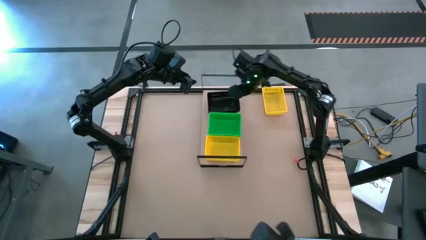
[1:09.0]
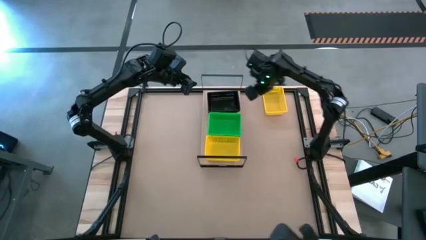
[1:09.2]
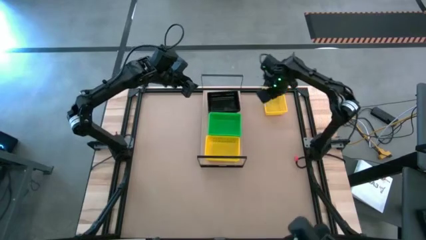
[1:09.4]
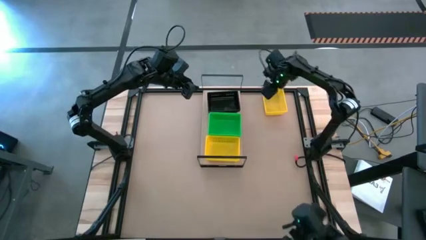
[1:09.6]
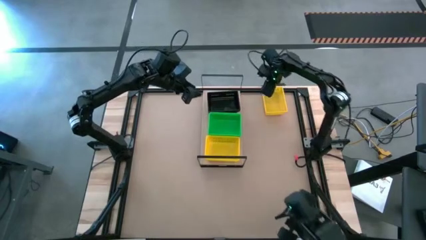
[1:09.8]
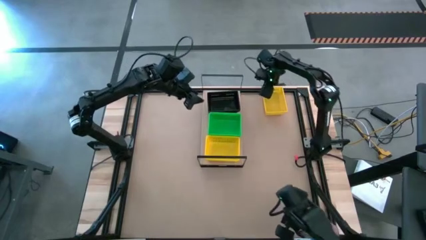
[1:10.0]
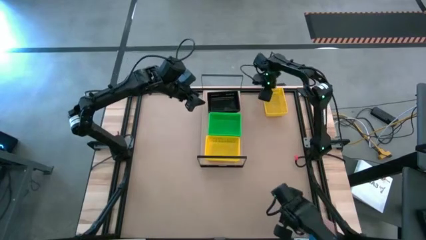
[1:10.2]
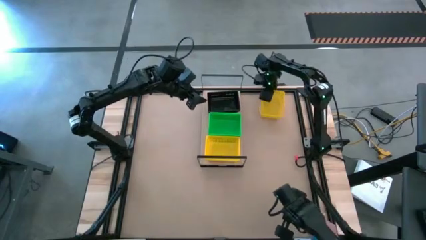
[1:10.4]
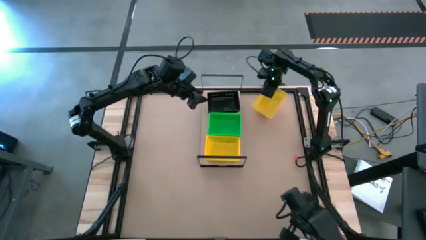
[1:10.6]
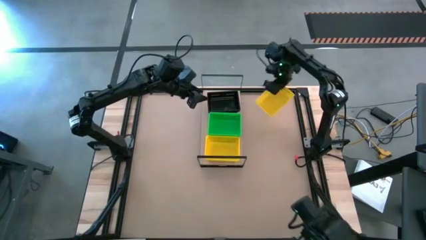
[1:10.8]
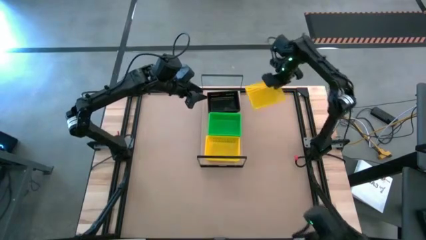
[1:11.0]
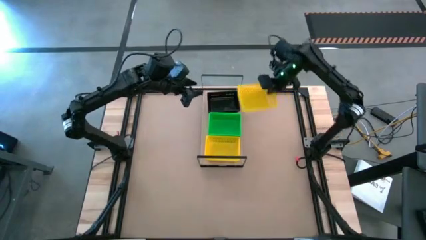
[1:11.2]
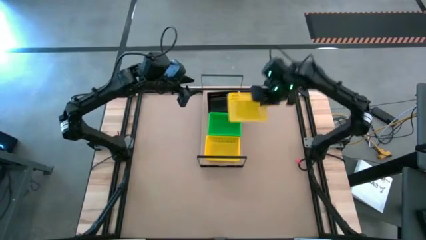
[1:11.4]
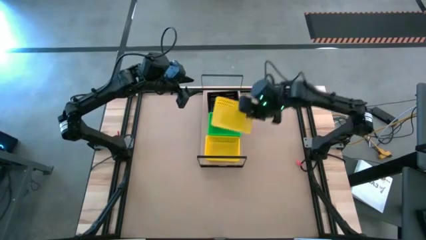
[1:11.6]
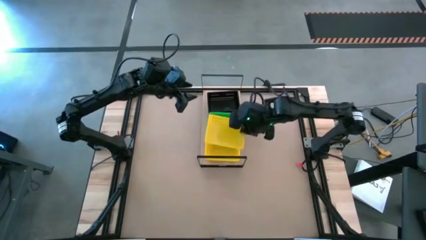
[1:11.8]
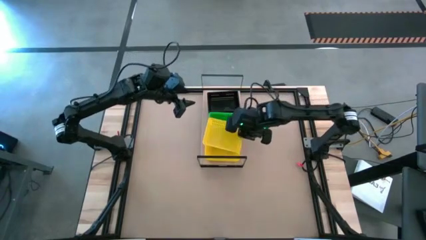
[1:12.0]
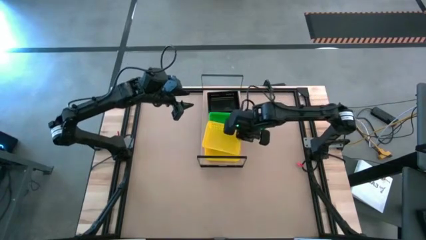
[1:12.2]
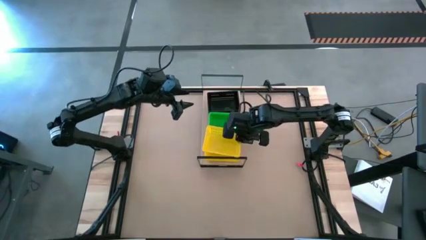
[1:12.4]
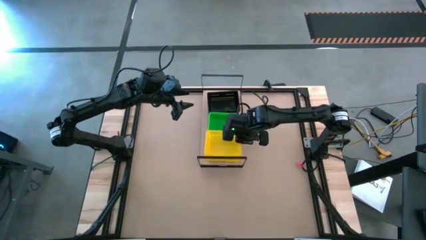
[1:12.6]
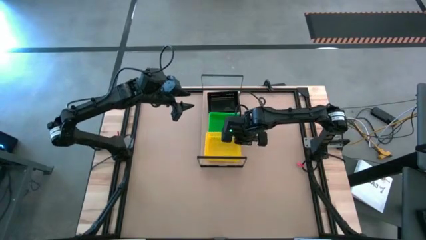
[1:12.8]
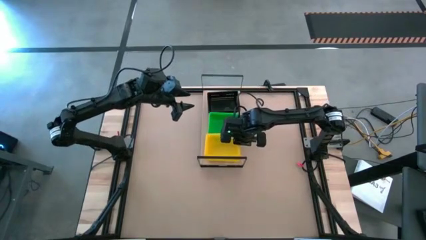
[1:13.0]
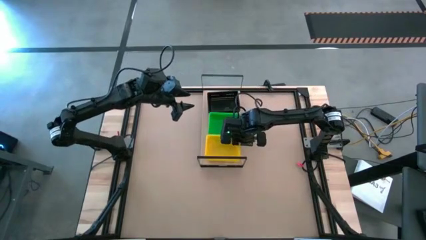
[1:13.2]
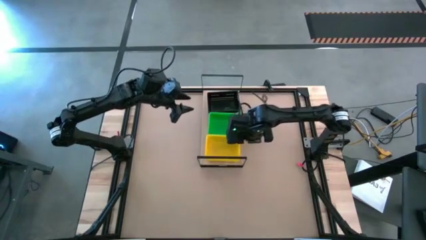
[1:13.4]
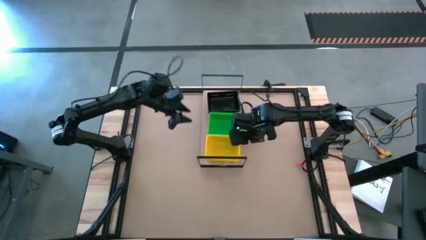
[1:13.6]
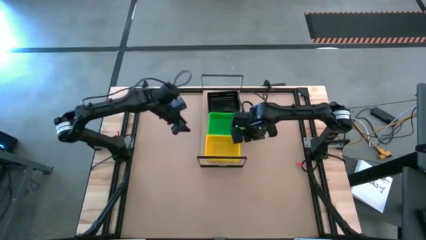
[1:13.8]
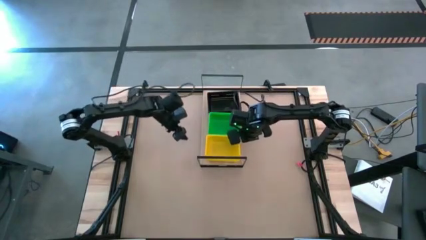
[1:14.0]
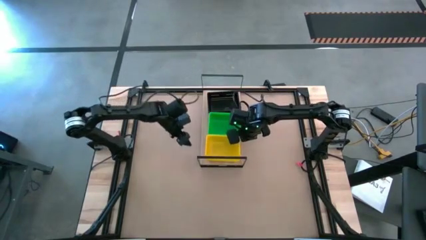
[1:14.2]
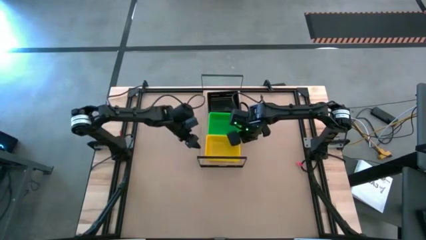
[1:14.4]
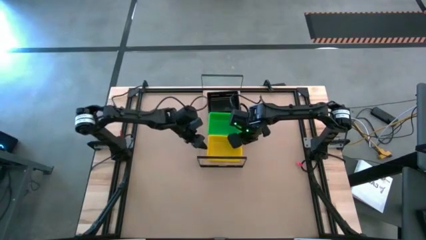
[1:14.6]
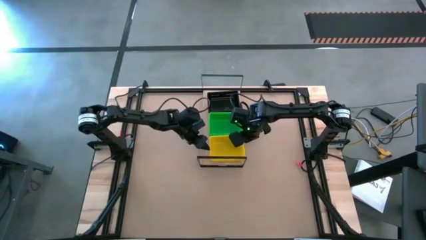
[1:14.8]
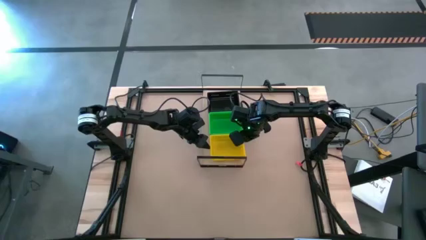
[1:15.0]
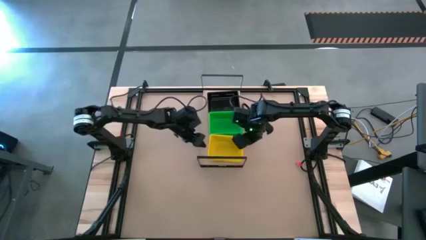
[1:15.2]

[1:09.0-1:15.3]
Task: Stack baskets on shelf by color
Stack the yellow bin on top of the yellow bins on the shelf

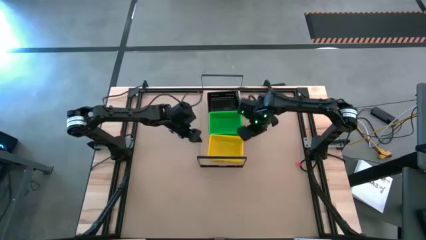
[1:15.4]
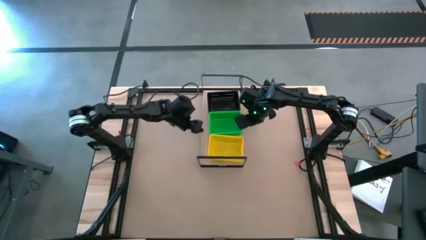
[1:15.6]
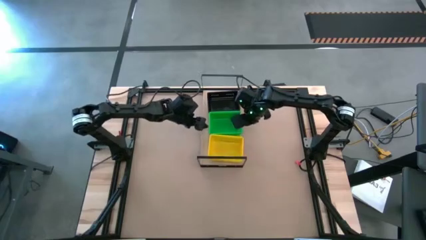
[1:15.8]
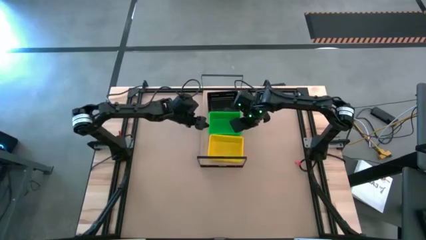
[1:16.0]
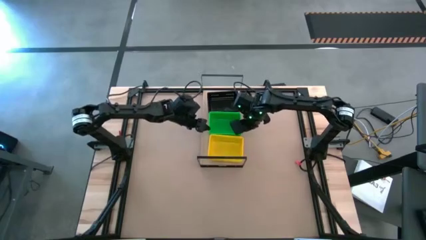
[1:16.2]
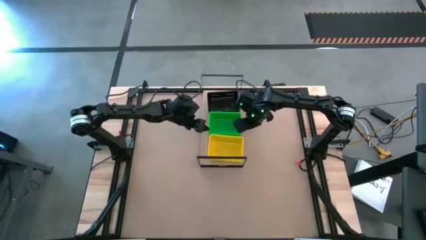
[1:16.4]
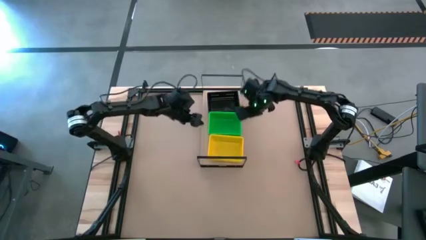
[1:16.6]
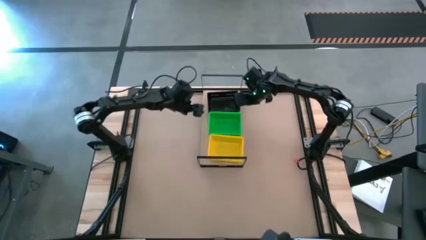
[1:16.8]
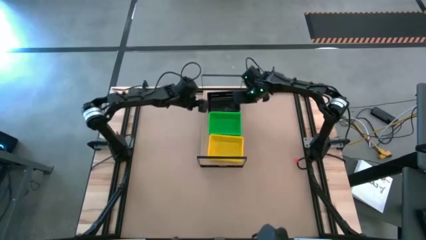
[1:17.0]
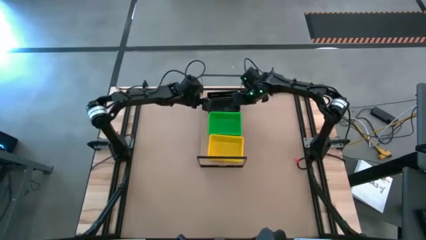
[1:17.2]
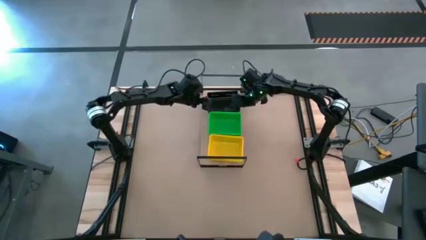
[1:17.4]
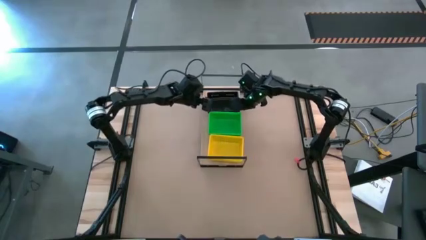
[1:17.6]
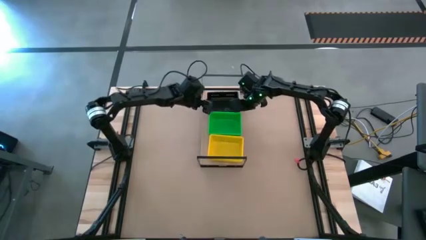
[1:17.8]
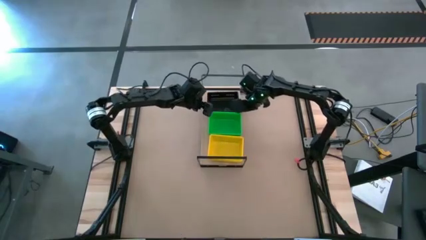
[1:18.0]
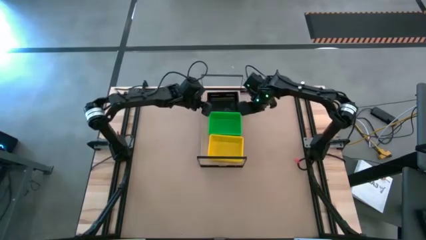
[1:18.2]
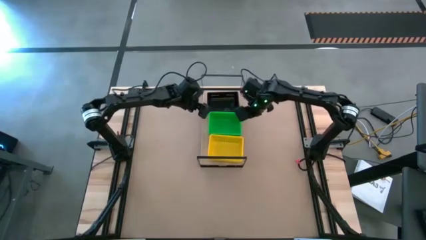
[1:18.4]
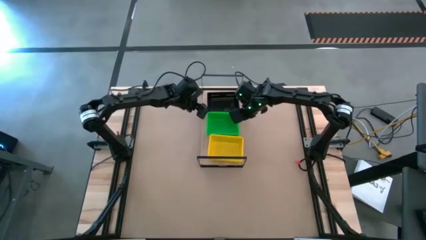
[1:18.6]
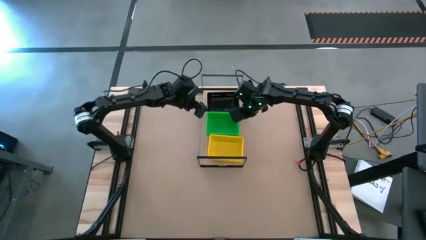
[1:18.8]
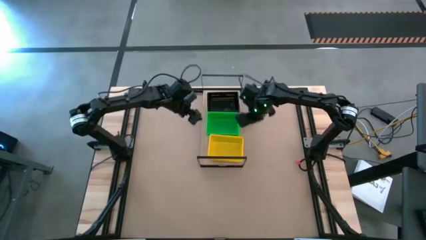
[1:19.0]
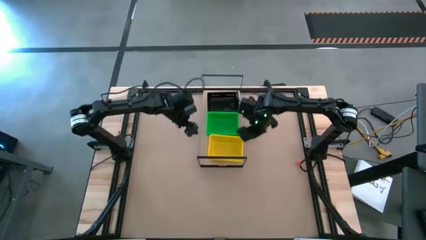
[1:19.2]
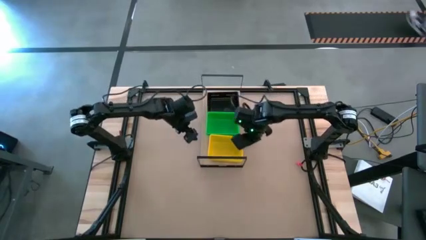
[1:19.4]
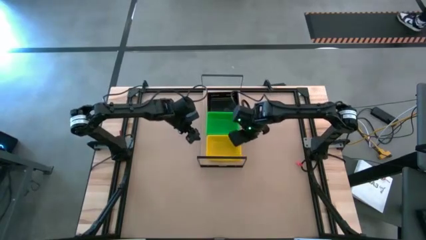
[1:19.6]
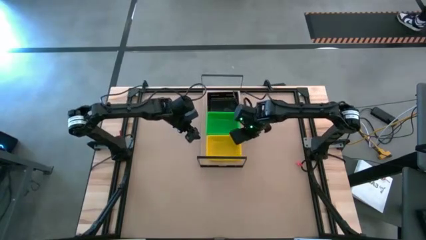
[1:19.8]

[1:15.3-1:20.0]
Adjust the colored bins

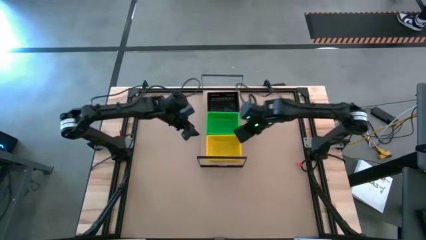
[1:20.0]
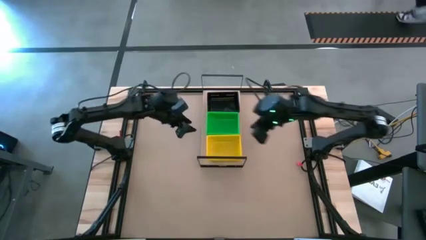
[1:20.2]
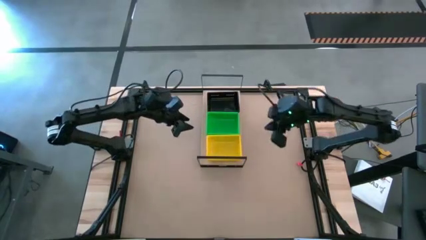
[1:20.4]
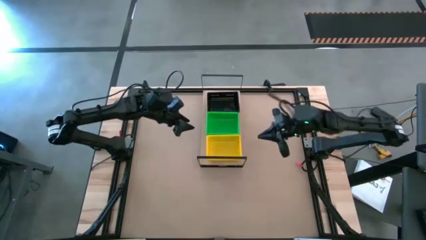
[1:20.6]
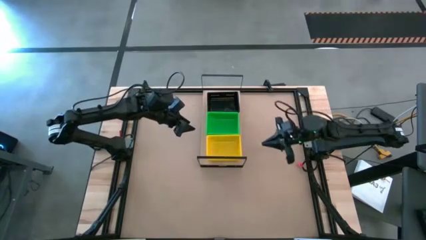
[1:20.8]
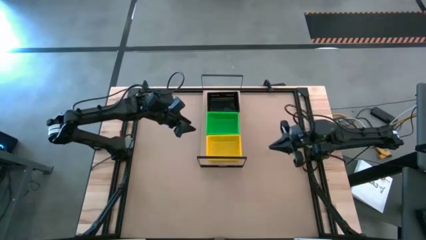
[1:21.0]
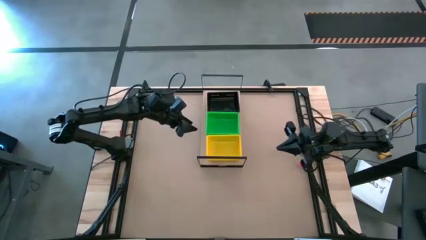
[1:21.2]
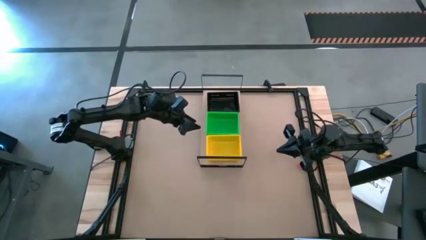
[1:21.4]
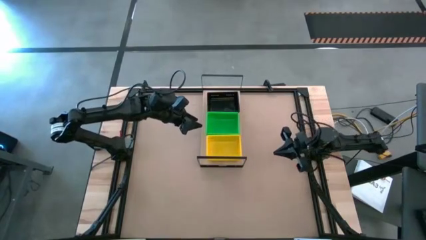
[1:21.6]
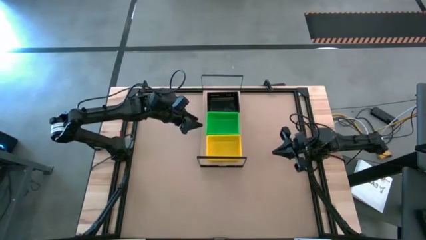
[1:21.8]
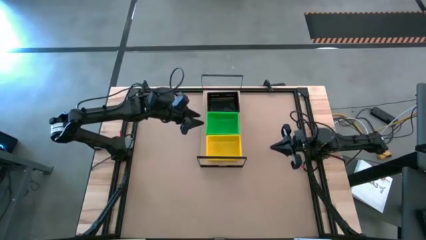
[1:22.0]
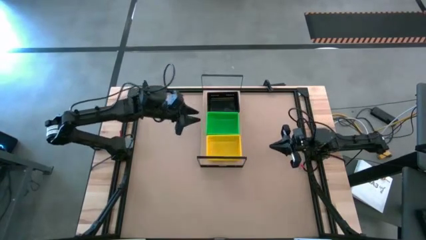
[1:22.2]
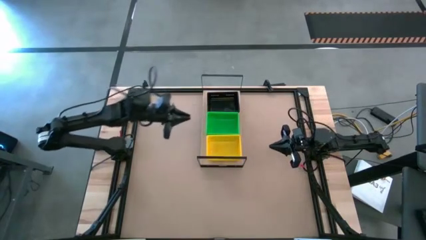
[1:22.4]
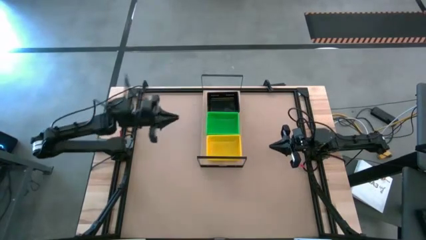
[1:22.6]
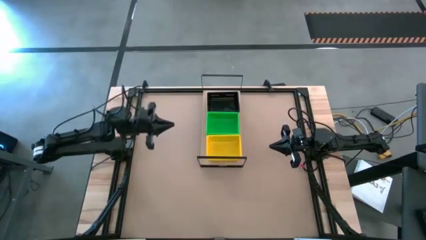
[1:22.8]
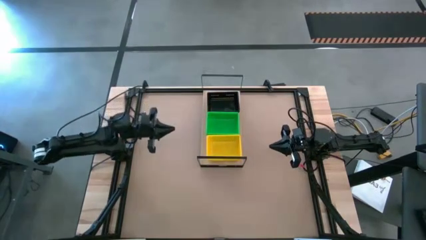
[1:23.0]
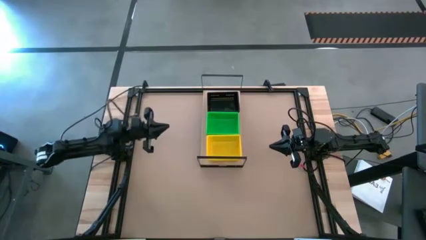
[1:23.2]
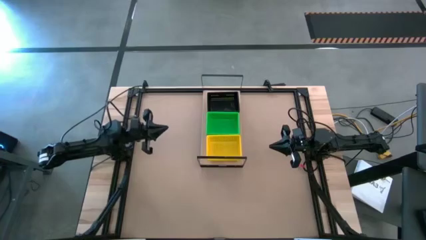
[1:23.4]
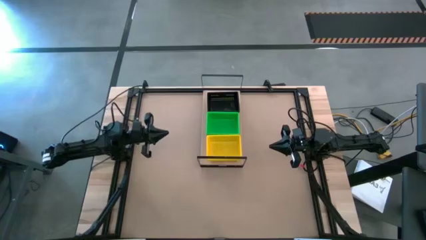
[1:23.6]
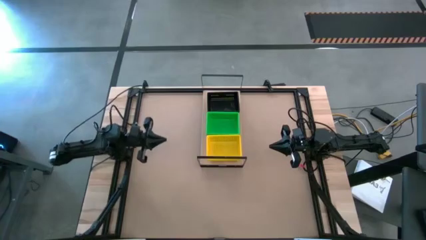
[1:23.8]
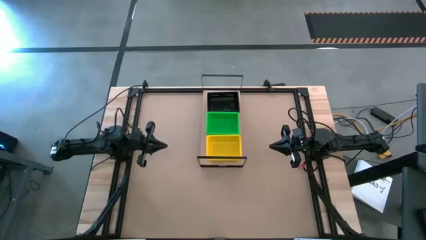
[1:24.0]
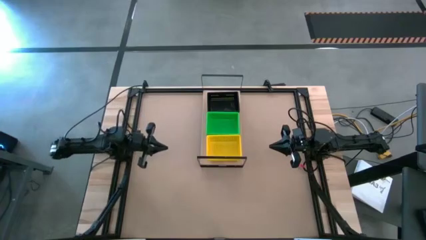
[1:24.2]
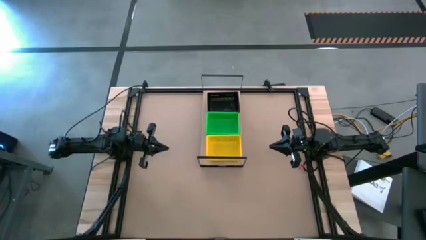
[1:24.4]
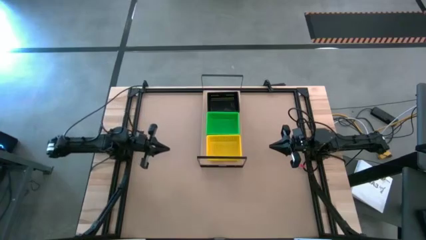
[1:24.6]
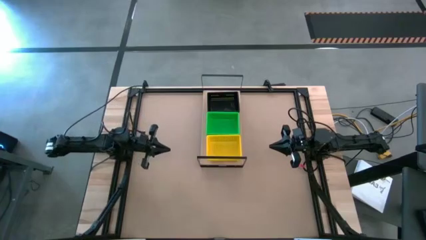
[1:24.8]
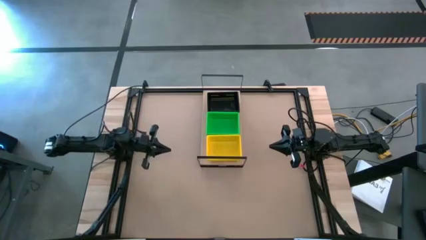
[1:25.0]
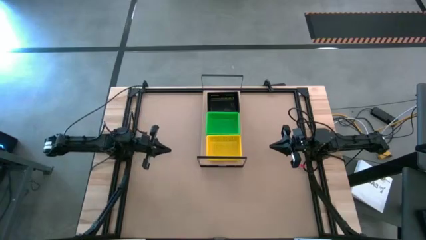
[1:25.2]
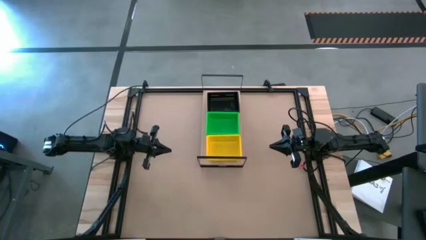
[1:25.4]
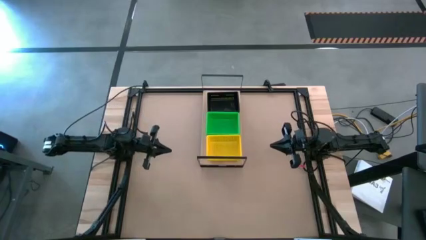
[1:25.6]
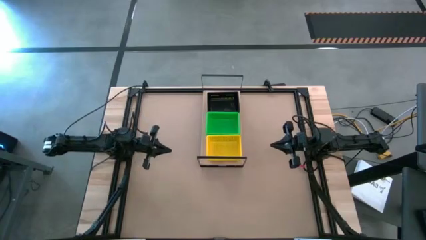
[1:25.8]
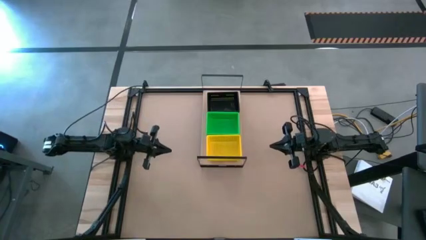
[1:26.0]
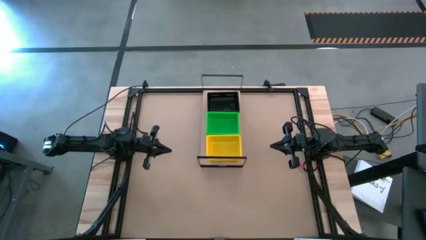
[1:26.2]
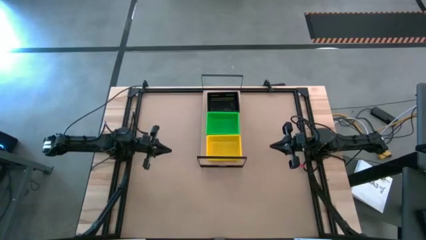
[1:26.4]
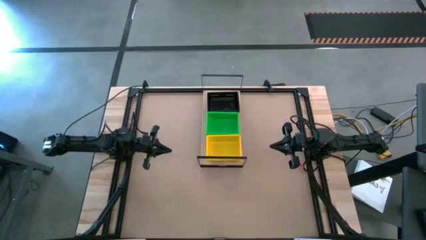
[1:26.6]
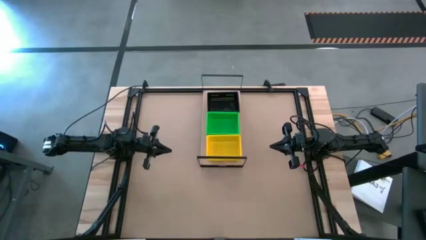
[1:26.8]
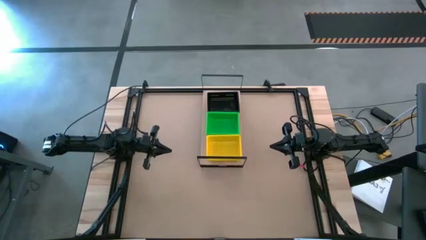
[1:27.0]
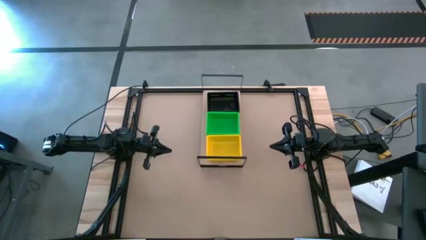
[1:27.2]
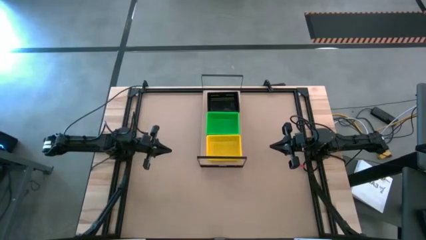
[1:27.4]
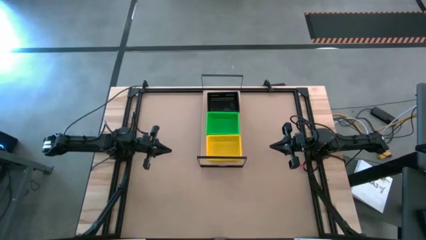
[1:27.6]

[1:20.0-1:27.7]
Return to Home Position
